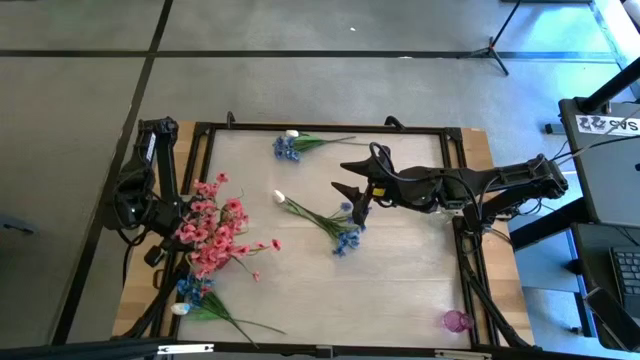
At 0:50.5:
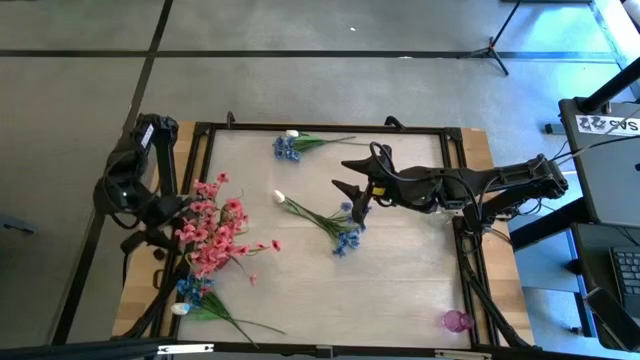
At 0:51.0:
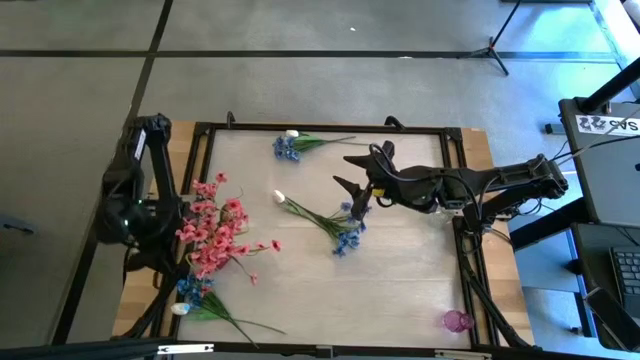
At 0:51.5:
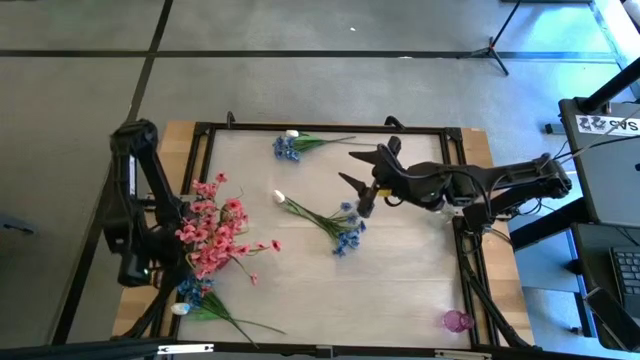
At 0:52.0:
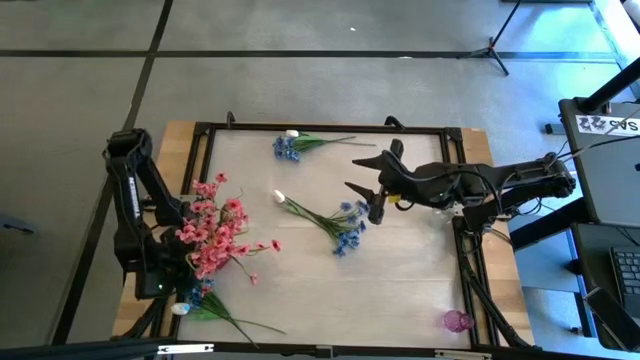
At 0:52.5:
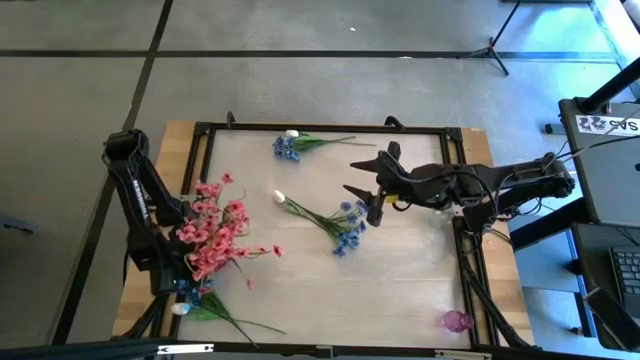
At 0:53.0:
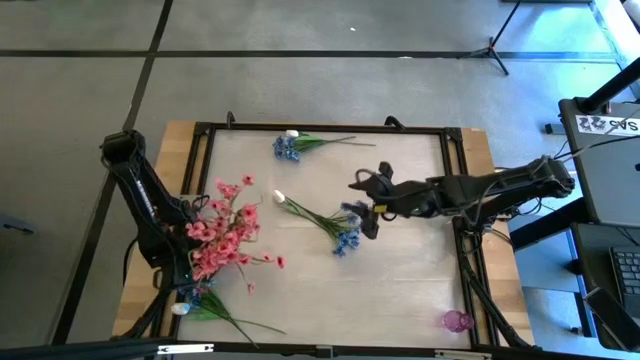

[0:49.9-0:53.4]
Task: Sort flowers into vase by color
Adjust the red vase on the table

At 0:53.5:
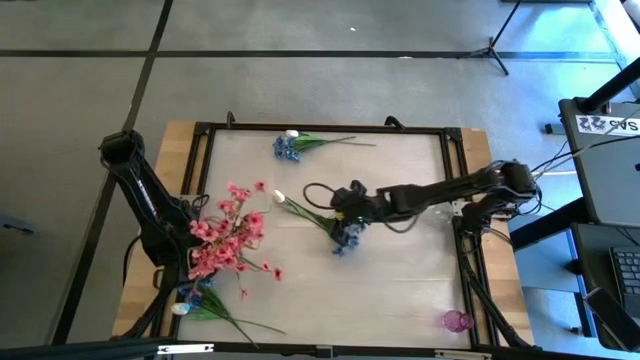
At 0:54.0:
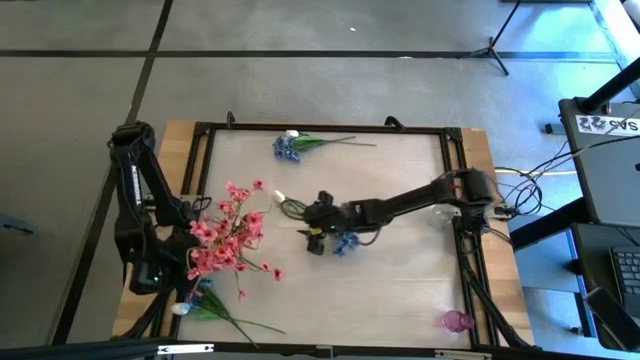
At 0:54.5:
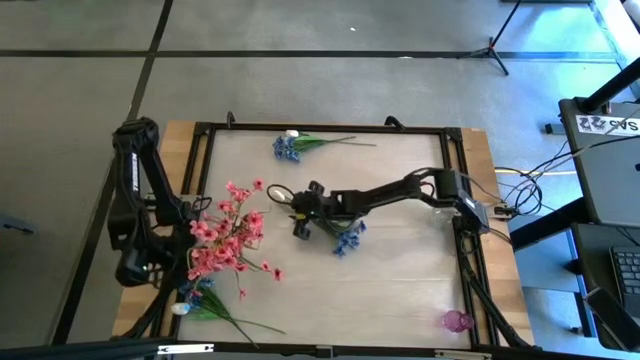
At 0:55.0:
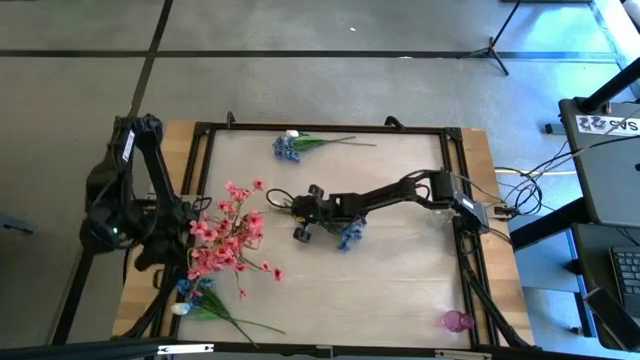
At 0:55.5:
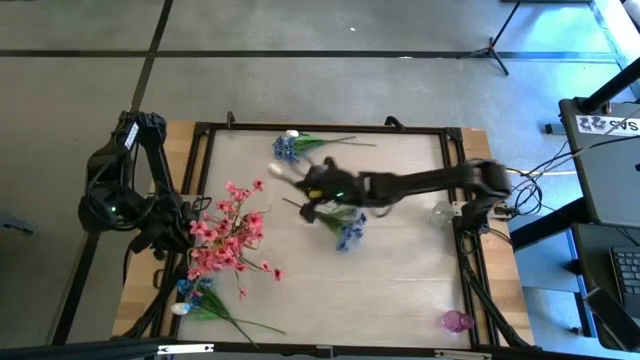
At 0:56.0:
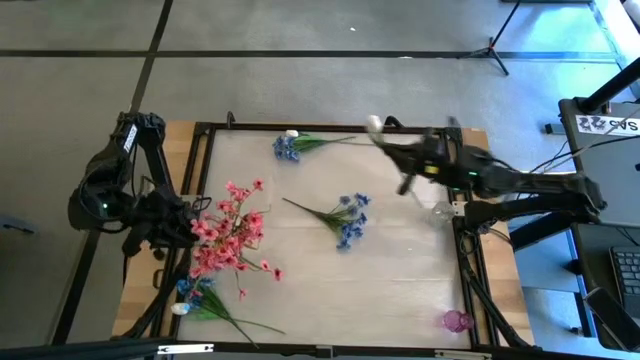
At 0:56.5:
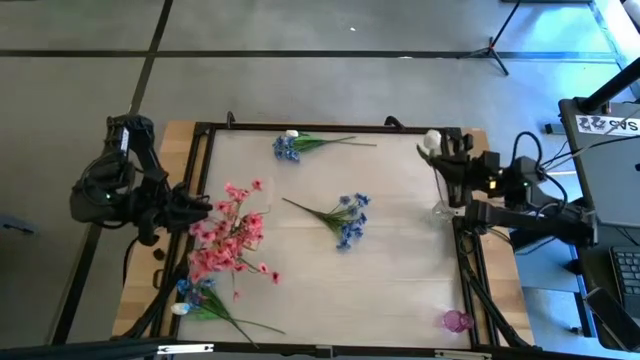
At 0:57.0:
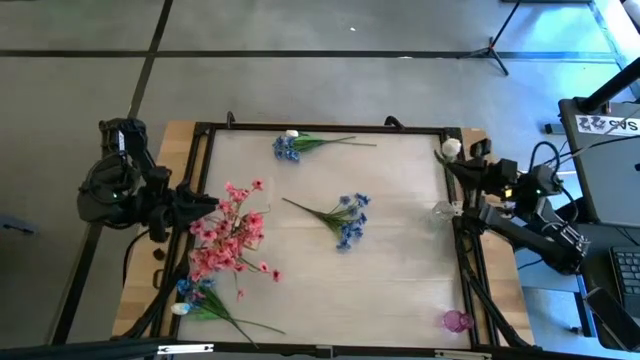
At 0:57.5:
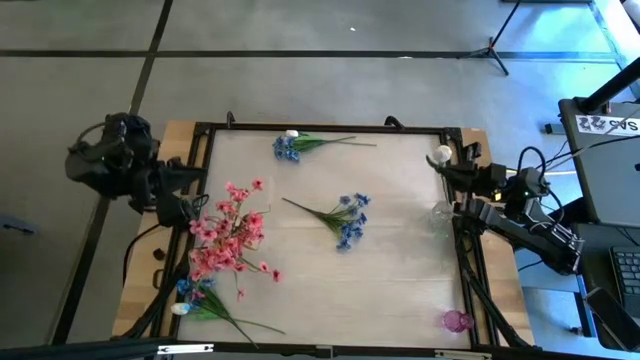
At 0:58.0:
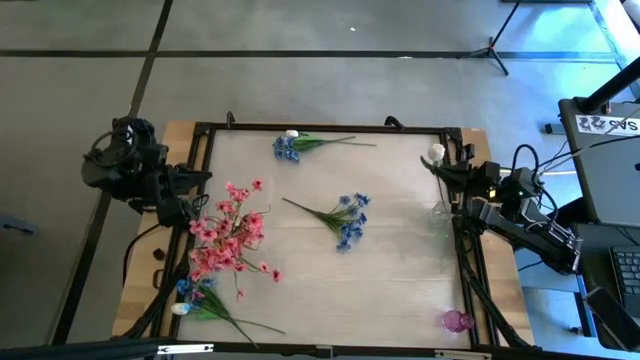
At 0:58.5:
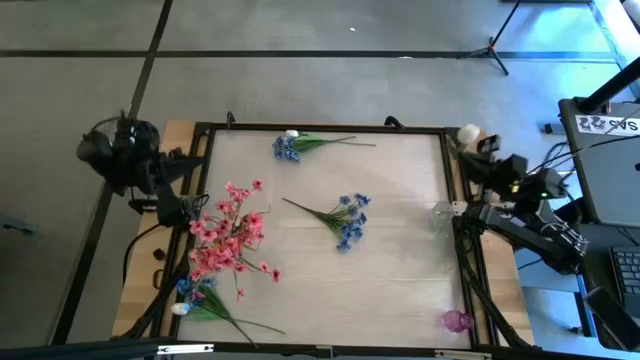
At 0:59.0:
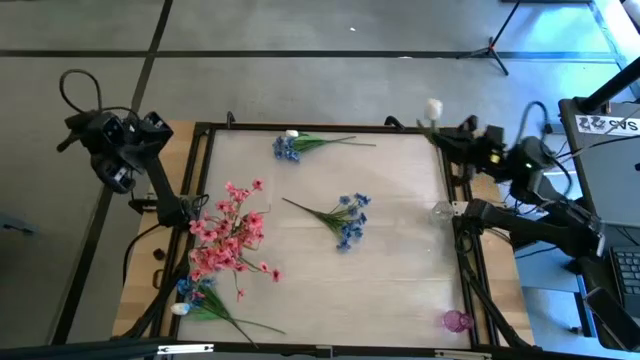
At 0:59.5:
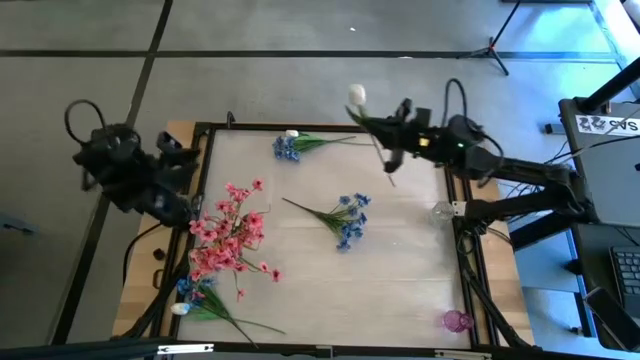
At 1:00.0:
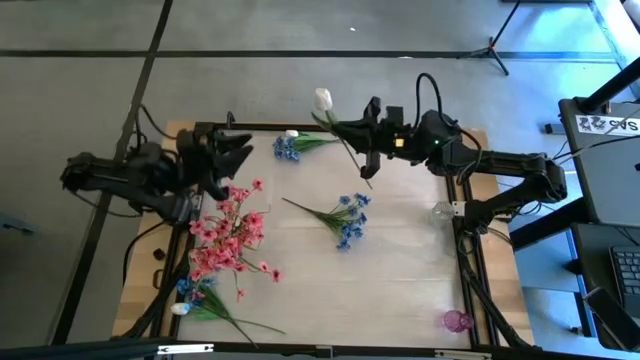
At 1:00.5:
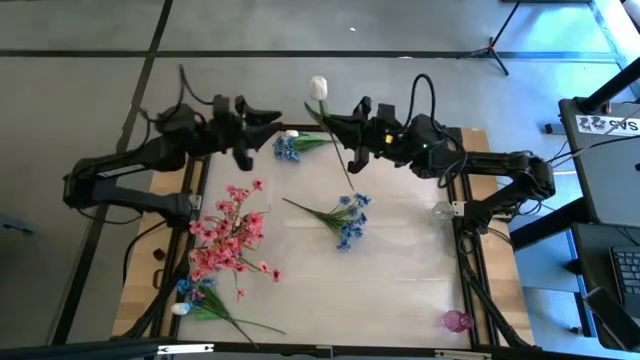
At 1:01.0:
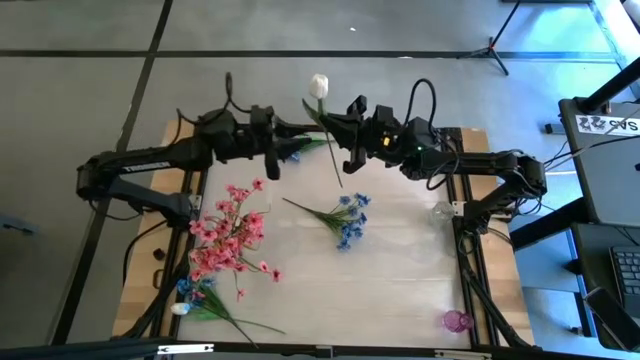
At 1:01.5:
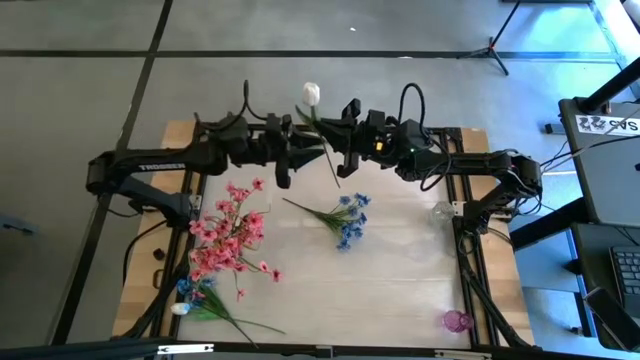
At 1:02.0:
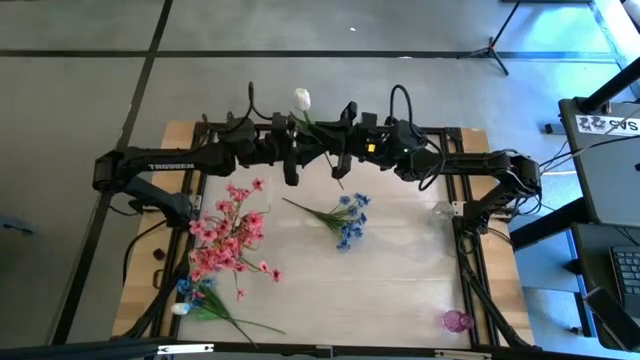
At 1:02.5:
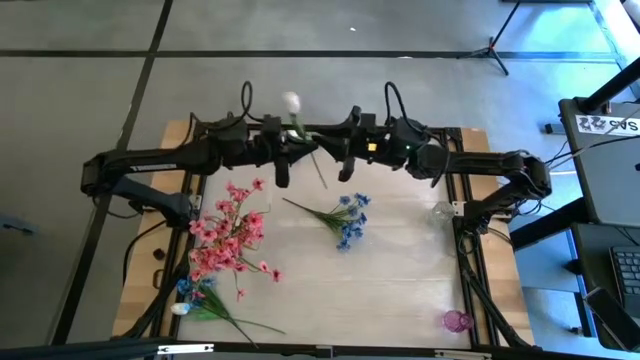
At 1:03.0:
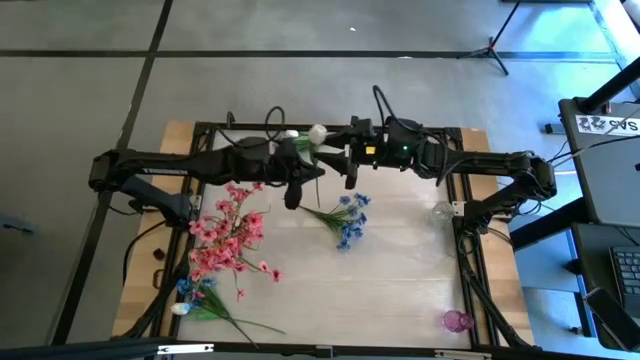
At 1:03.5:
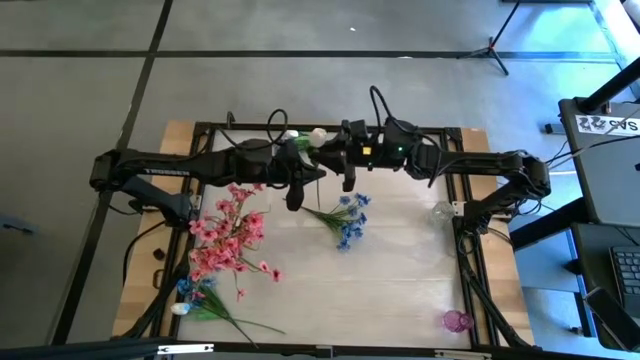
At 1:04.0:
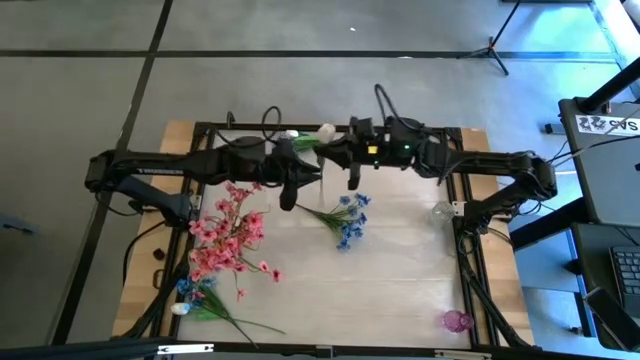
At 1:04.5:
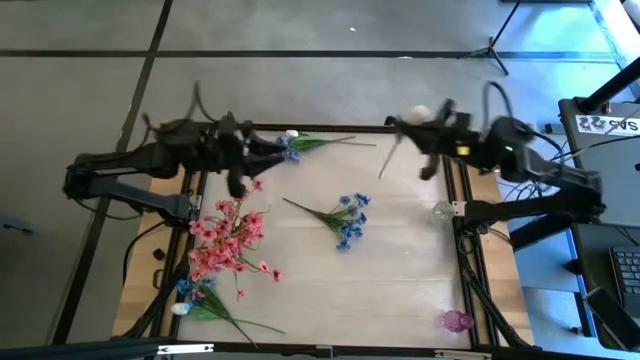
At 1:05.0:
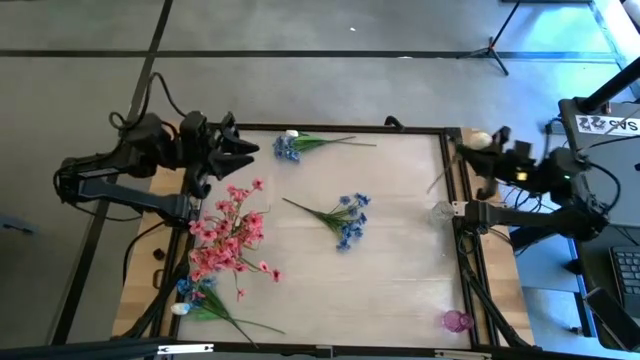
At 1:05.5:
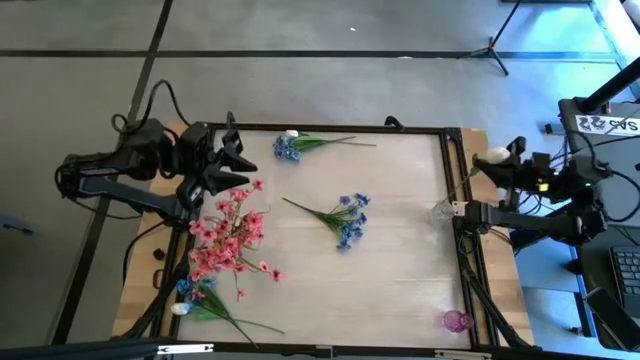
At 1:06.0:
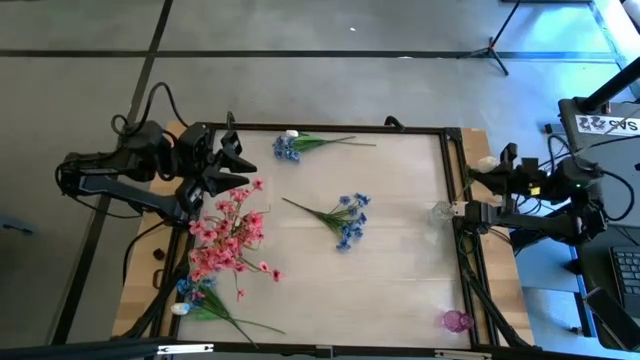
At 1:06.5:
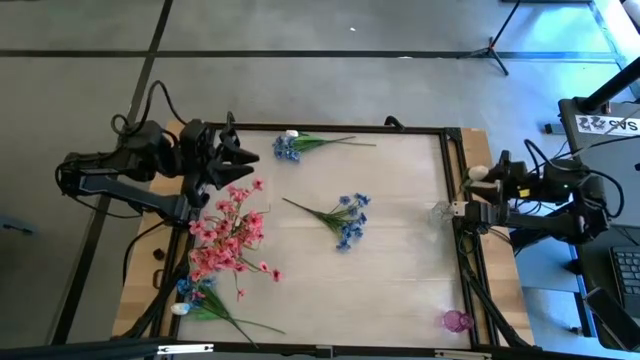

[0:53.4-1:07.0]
Put the center white tulip into the transparent vase

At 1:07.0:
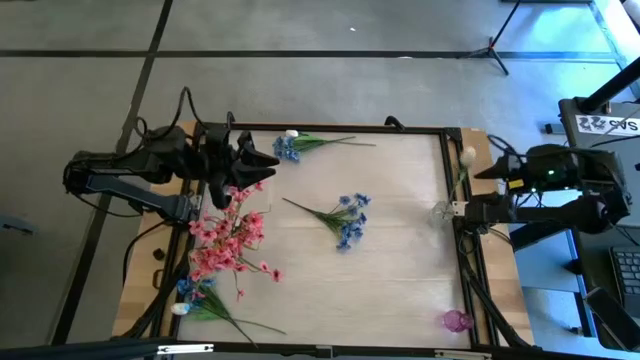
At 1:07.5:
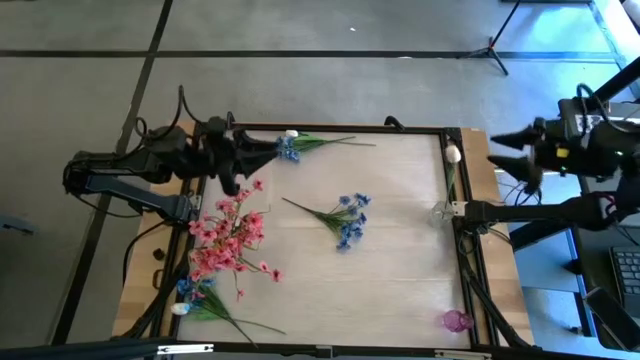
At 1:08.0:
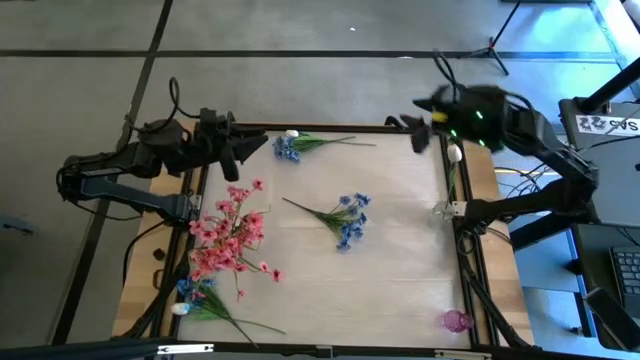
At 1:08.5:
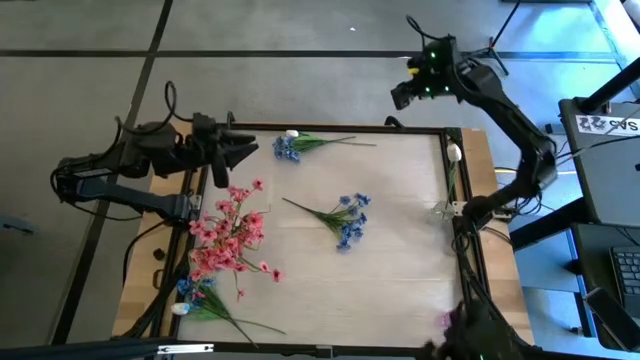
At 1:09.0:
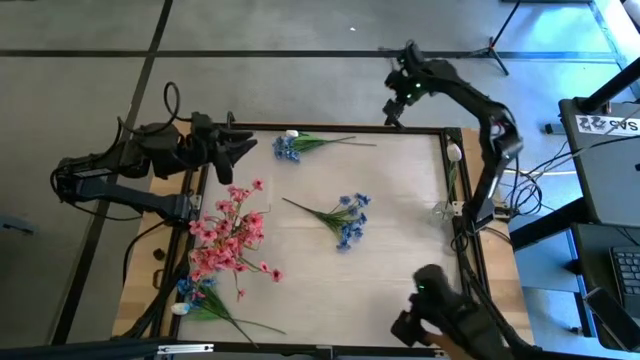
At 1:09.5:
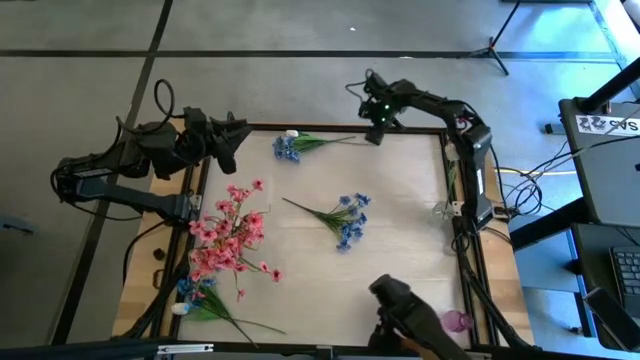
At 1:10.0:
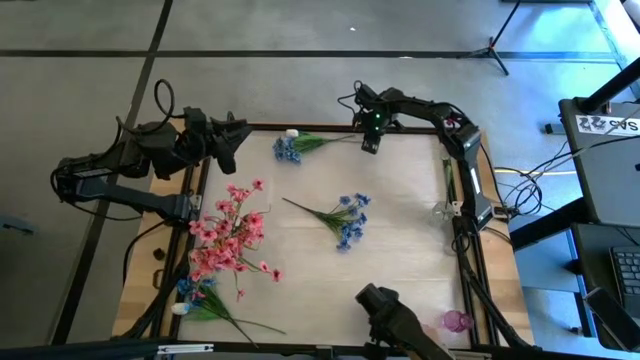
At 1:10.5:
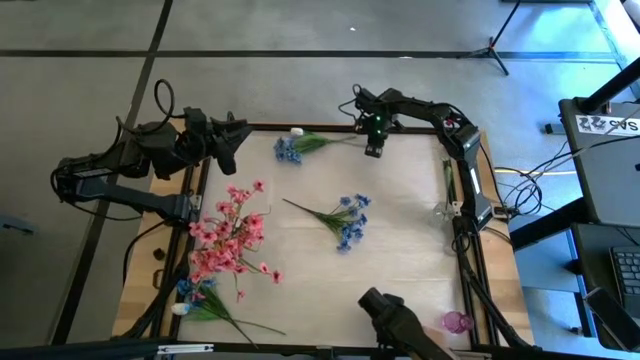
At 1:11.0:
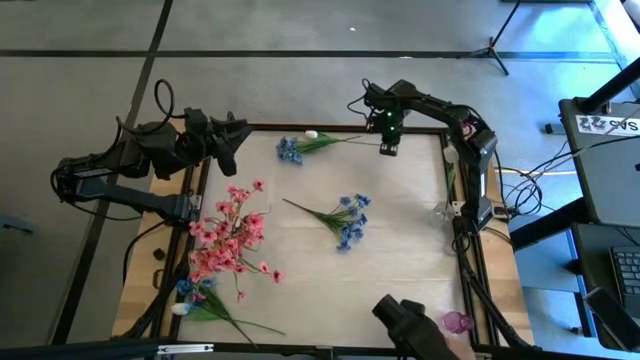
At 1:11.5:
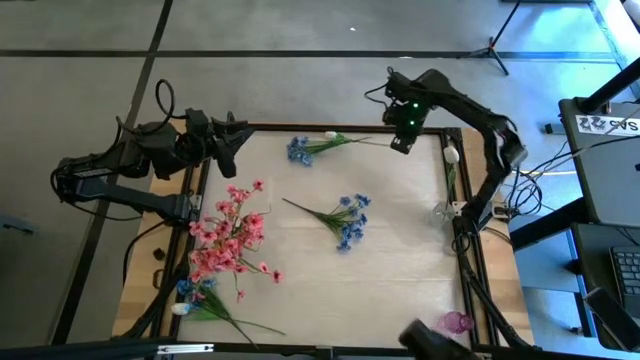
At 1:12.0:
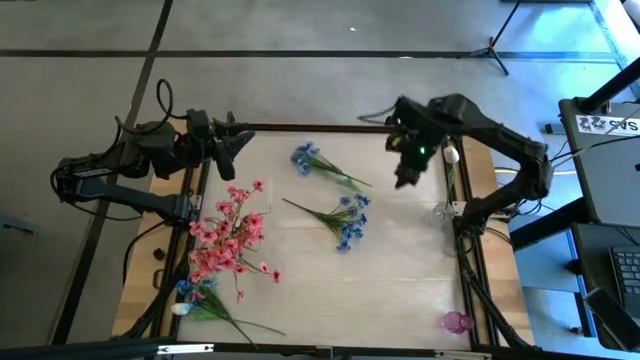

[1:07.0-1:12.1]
Put the top white tulip into the transparent vase
